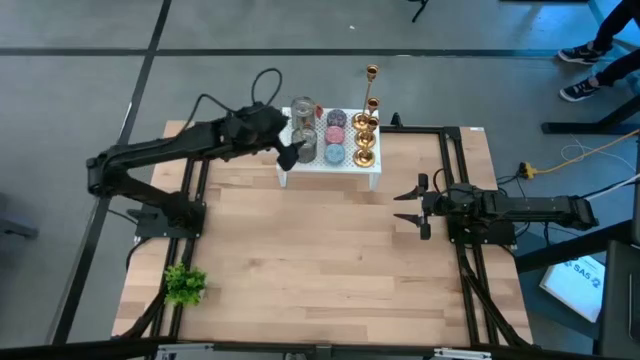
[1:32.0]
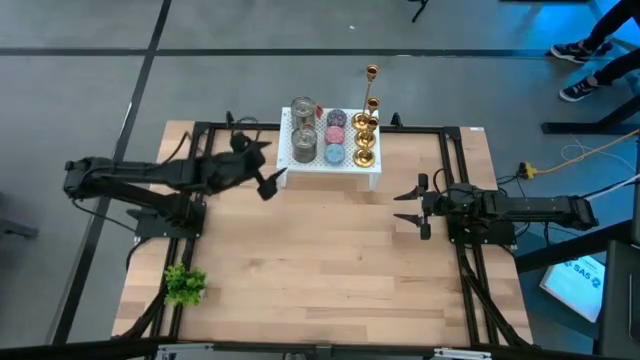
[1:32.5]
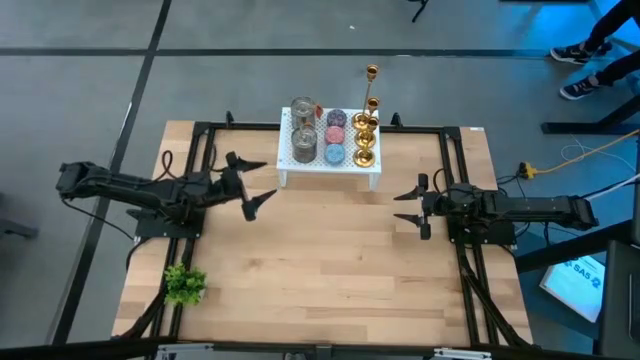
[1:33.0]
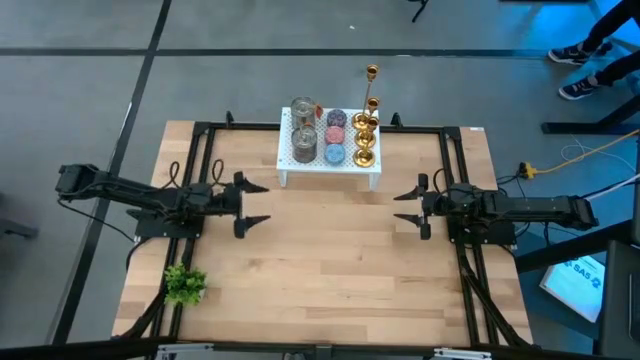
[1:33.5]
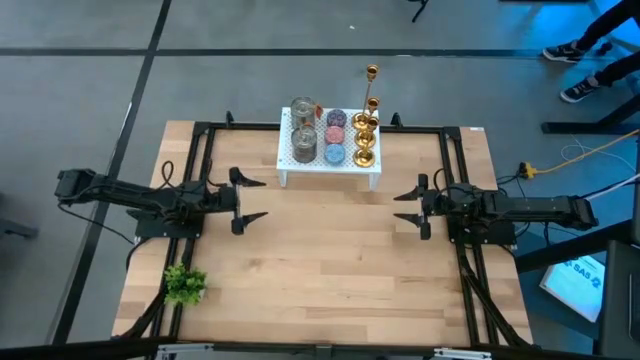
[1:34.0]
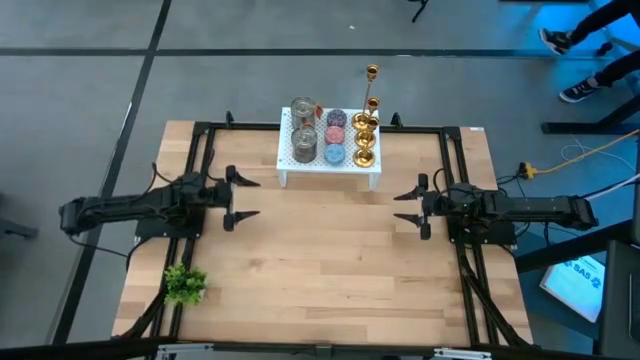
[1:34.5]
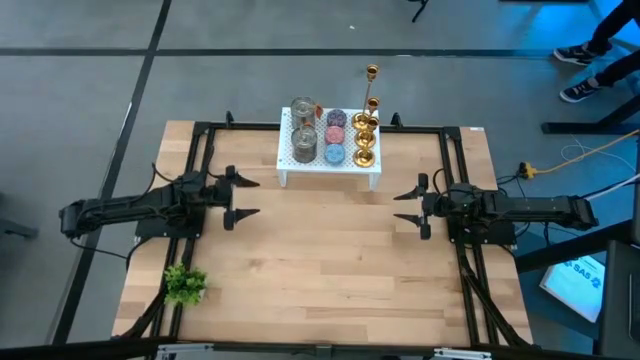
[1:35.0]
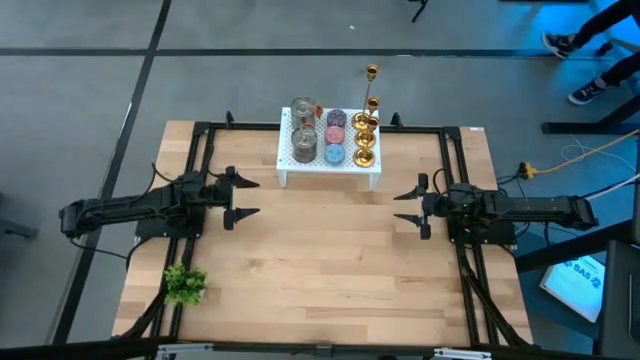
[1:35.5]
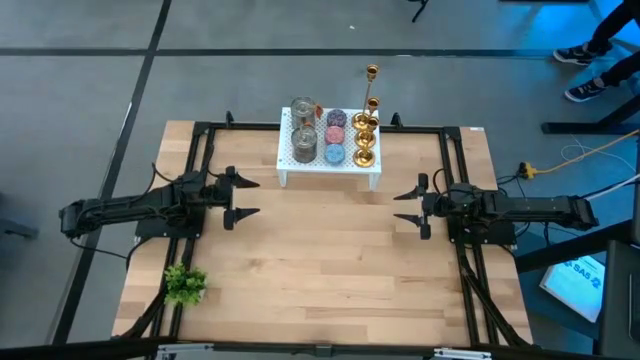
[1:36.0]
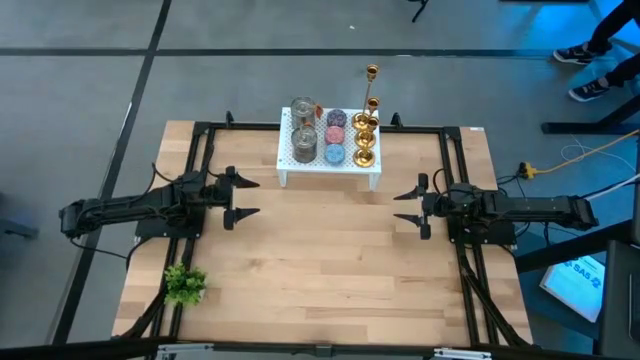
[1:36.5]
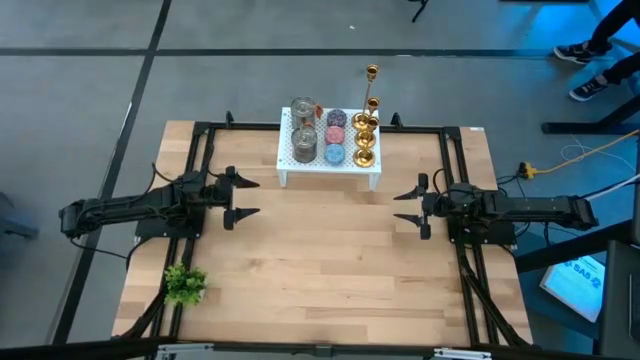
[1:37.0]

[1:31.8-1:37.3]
Task: Pick & Place candle stick holders
Return to Home Position

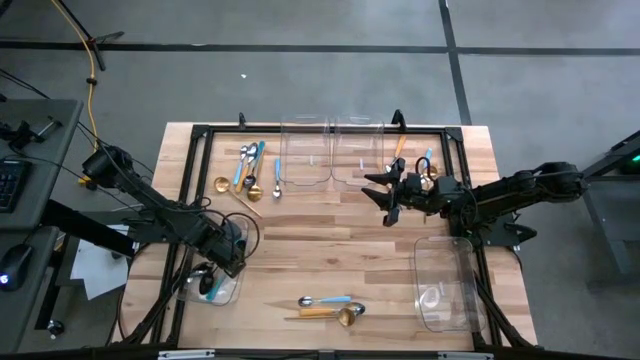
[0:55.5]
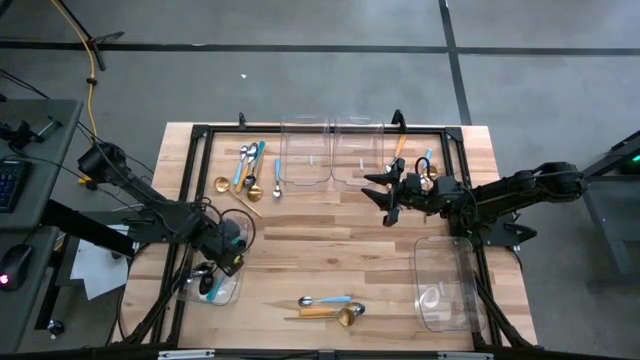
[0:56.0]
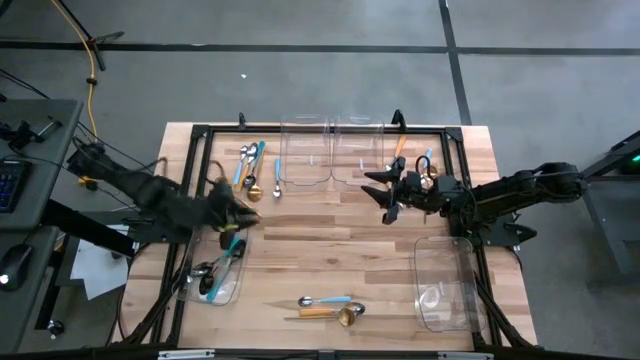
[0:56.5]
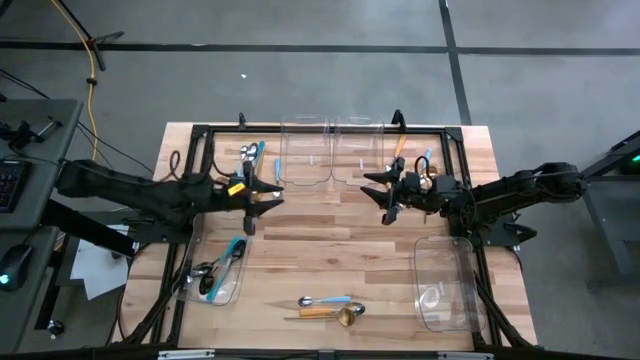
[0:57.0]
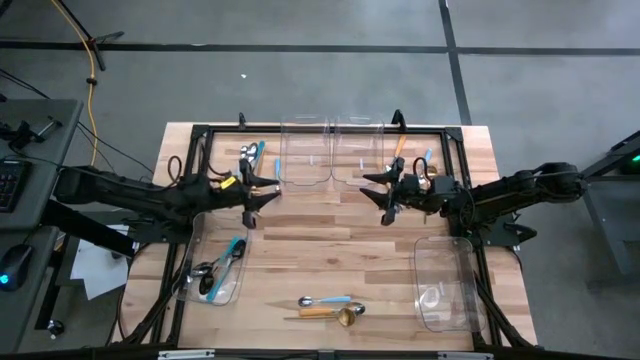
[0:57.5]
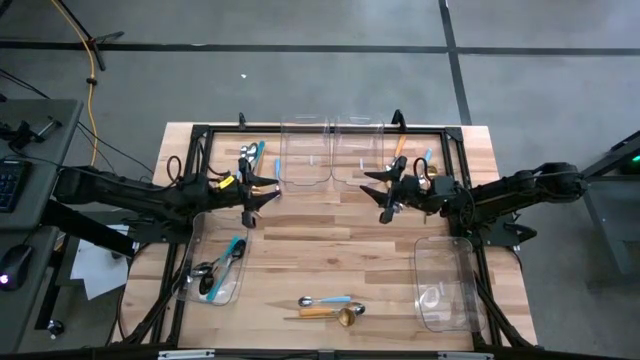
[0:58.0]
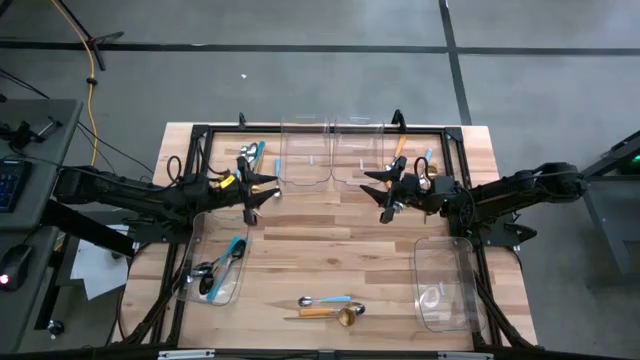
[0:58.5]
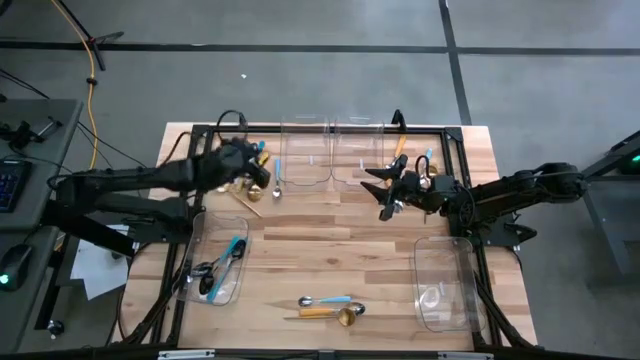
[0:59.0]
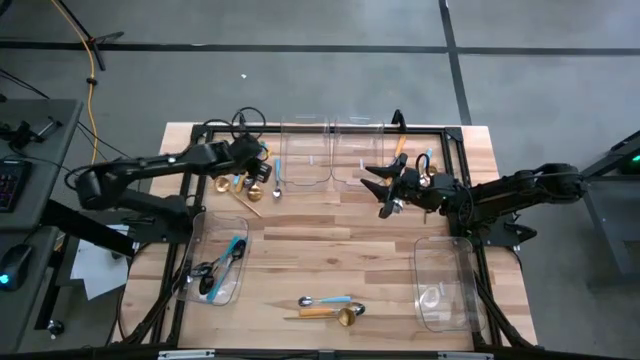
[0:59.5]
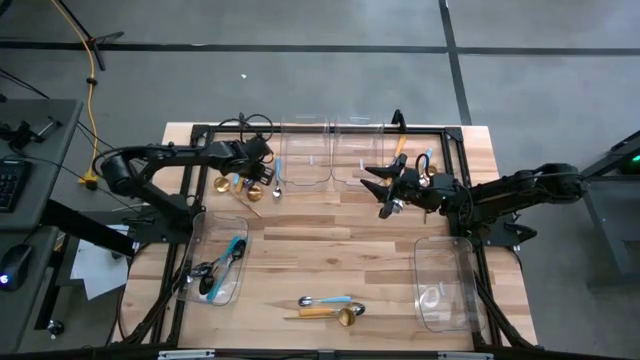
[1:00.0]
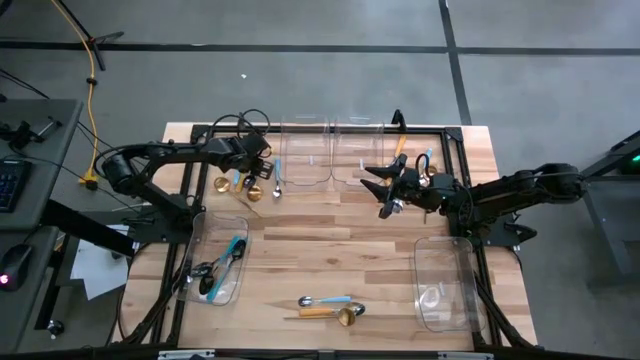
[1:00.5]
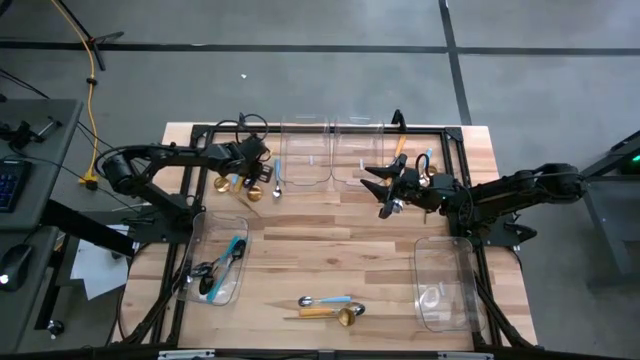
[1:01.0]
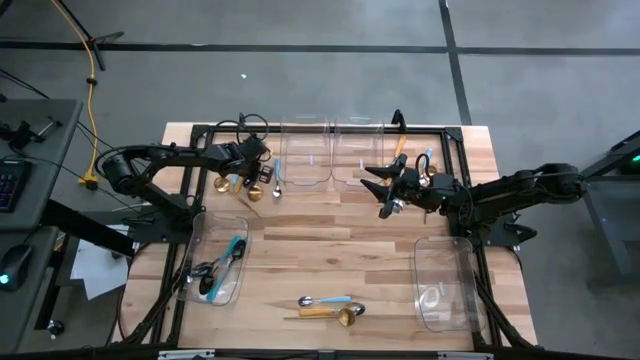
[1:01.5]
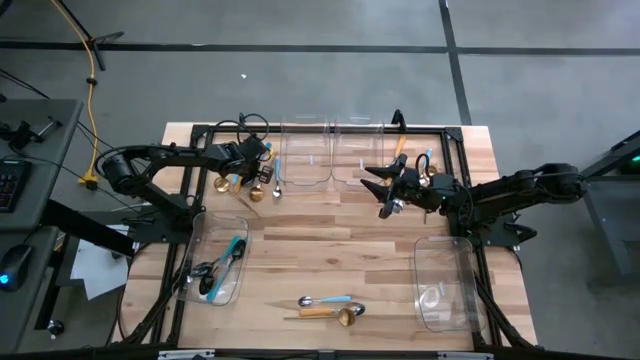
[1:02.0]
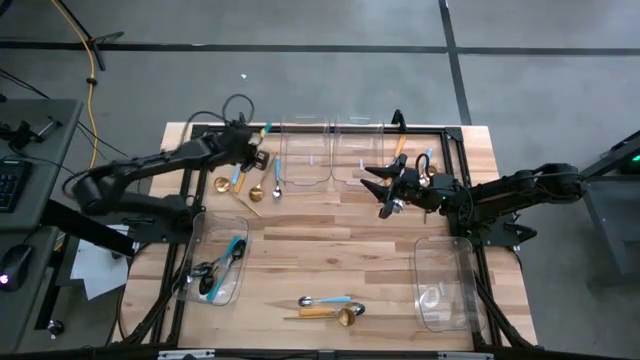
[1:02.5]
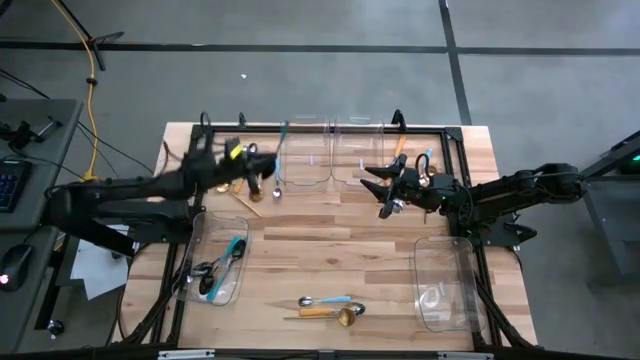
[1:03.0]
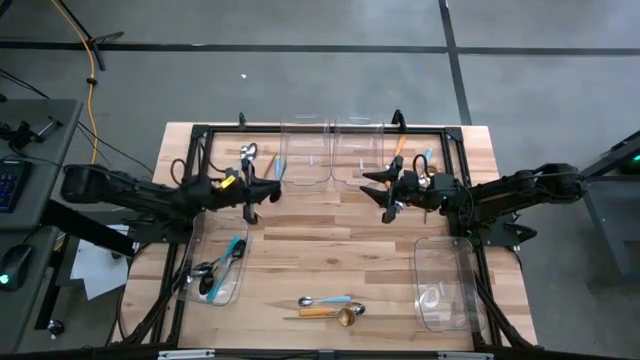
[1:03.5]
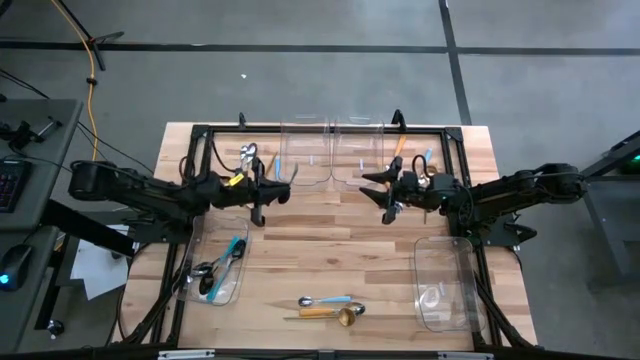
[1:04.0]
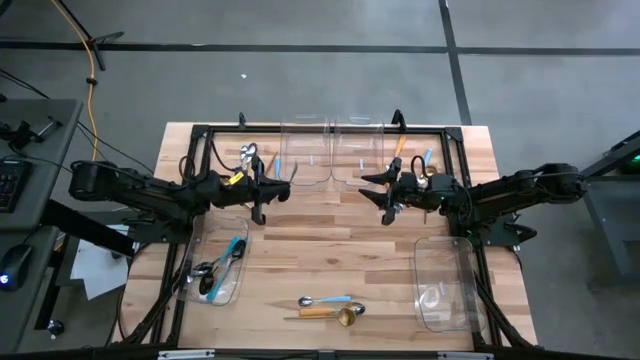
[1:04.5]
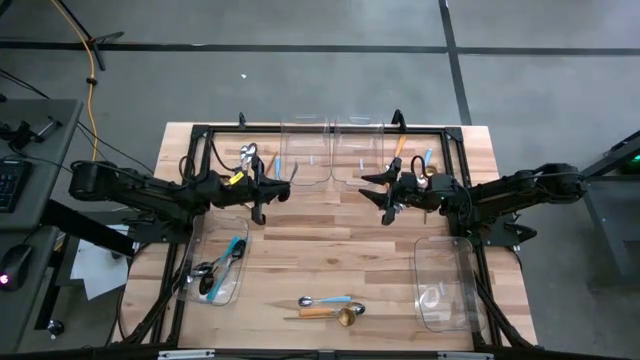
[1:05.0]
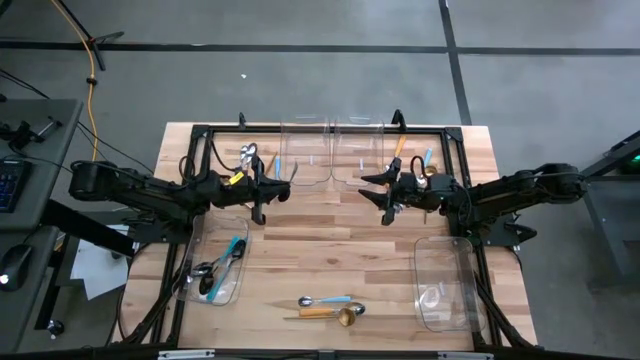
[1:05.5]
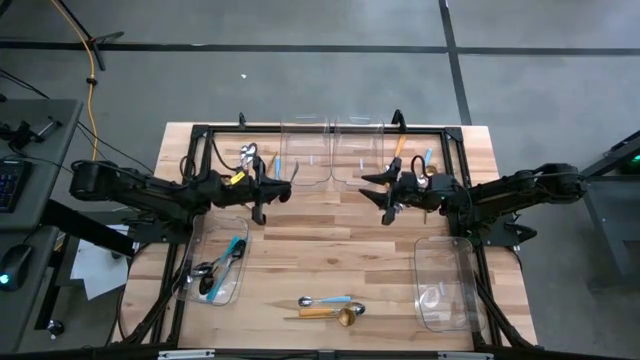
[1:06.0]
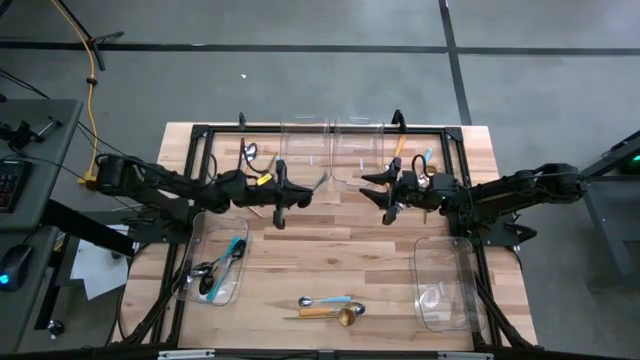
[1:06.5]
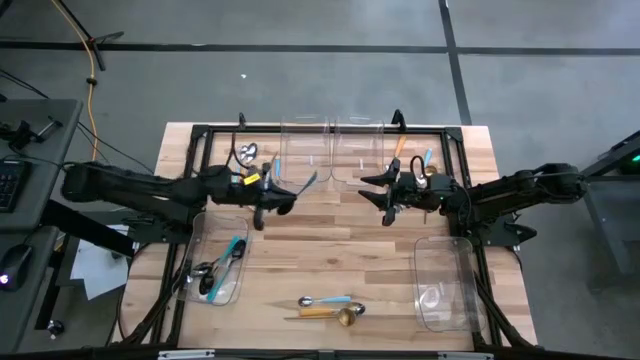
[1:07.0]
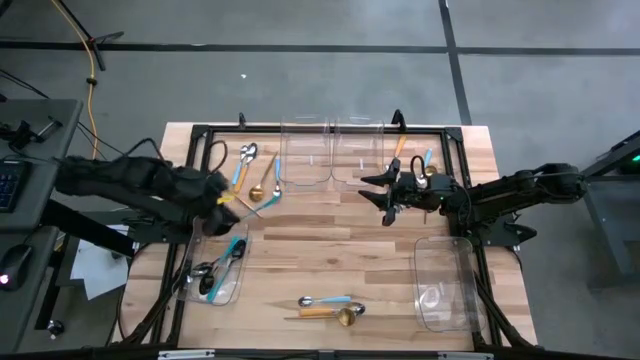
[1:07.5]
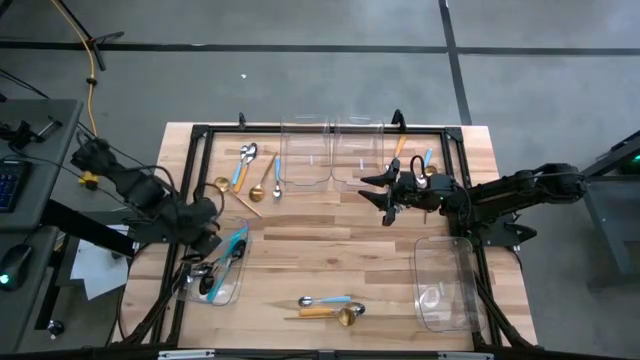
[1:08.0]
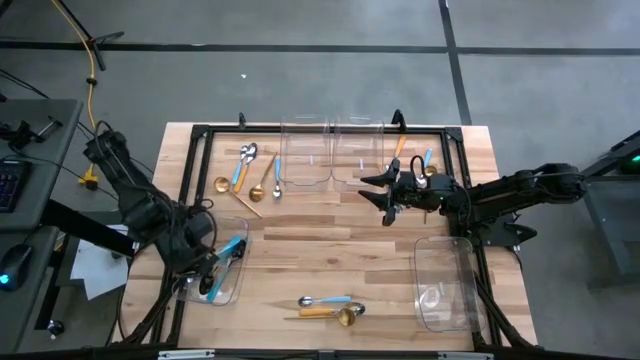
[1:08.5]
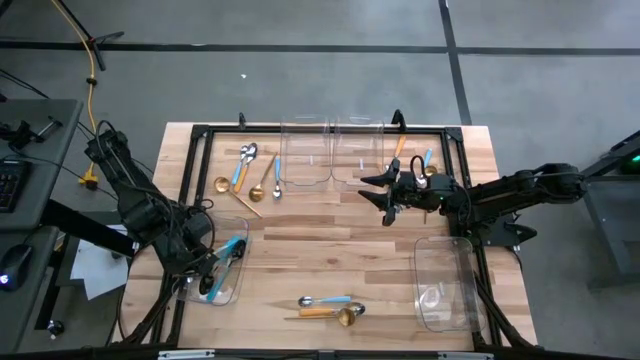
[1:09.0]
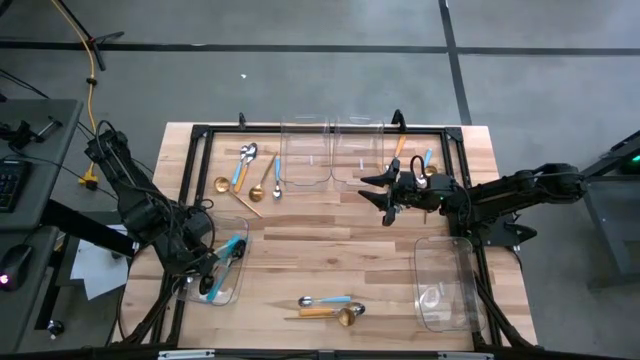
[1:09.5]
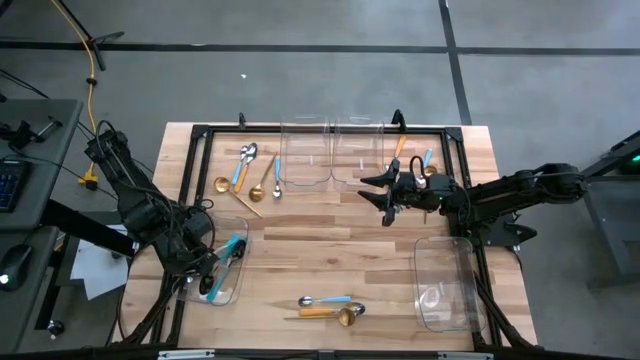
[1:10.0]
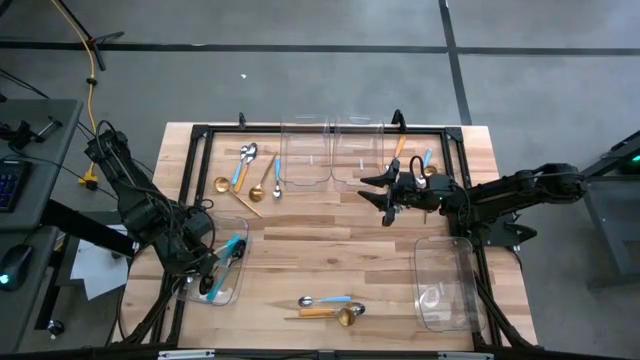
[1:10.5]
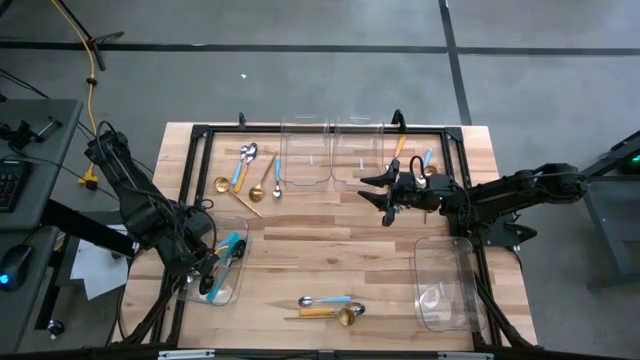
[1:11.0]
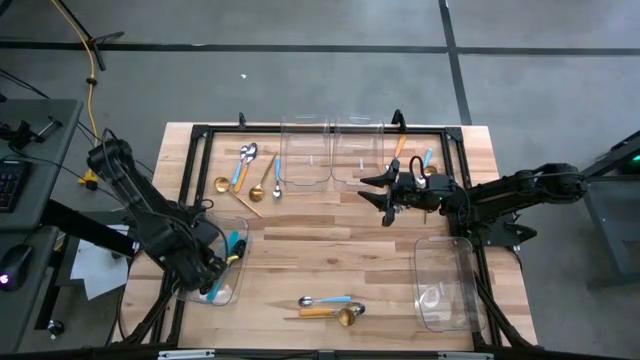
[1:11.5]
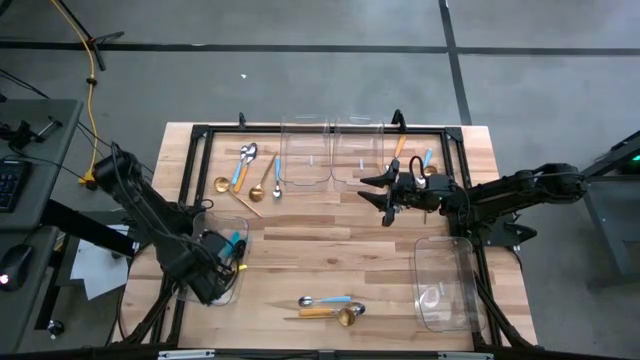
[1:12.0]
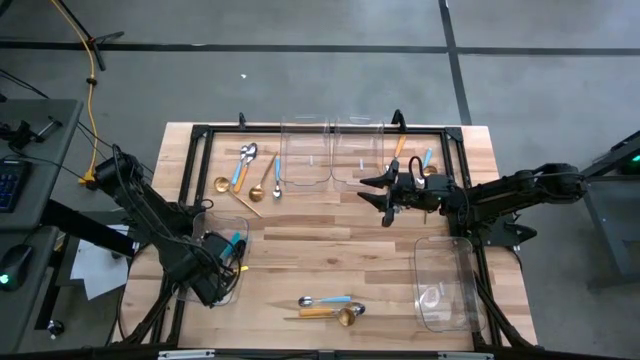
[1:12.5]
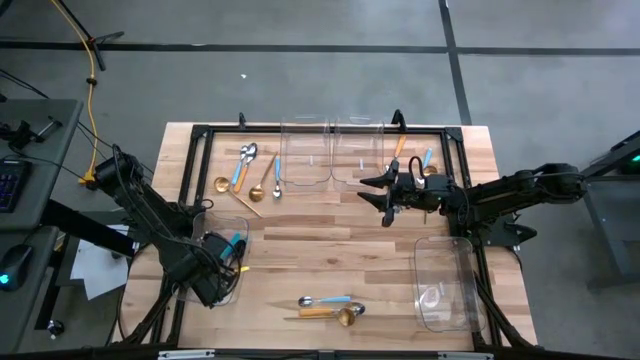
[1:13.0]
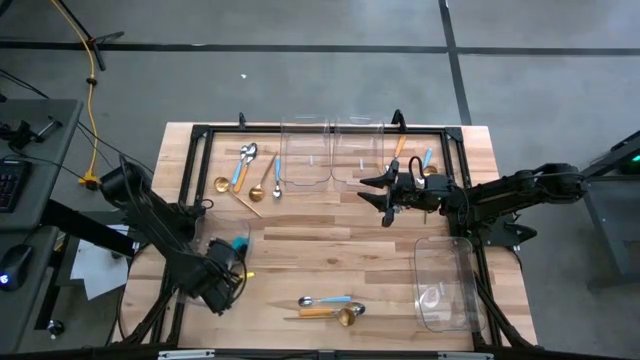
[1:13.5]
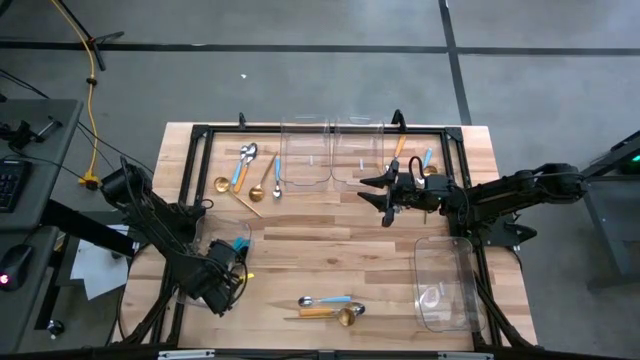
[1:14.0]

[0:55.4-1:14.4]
Task: Sort silverware by color (type)
Put the black spoon into the bottom left transparent bin
